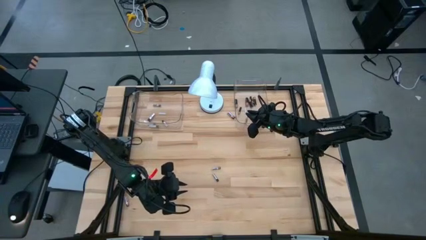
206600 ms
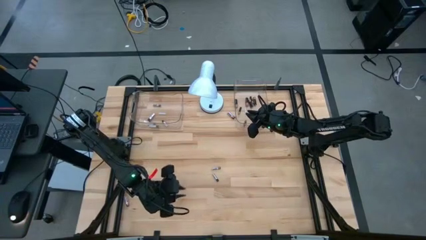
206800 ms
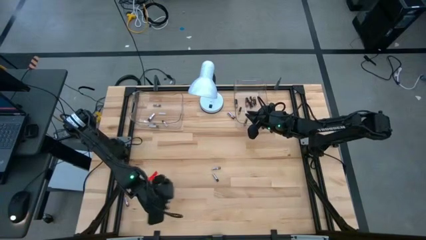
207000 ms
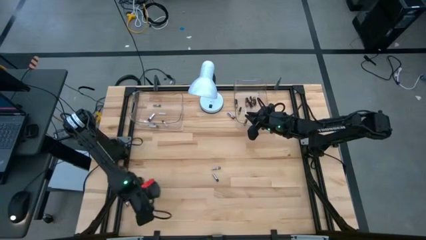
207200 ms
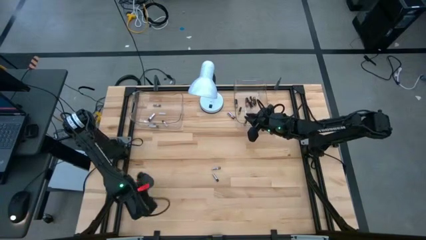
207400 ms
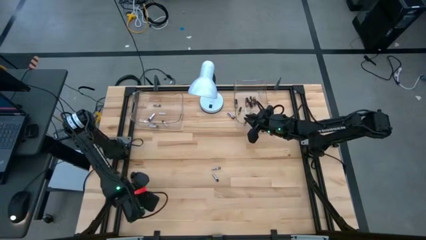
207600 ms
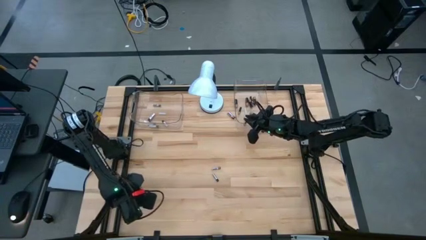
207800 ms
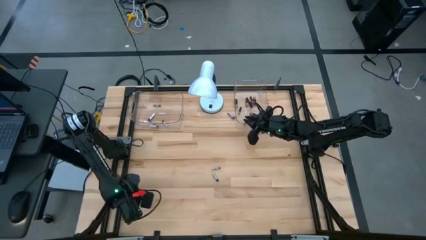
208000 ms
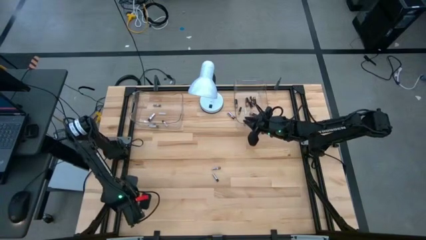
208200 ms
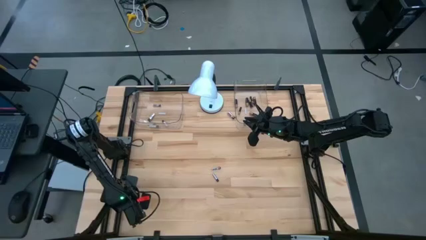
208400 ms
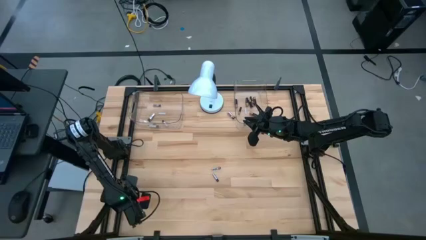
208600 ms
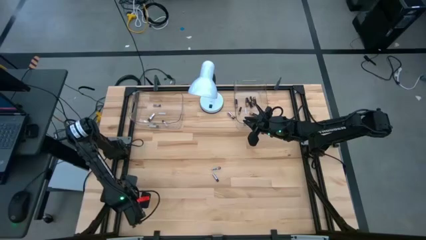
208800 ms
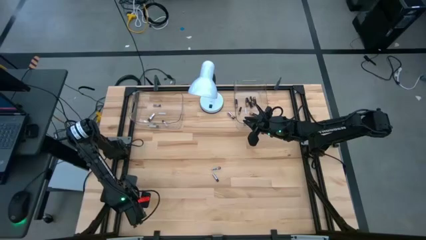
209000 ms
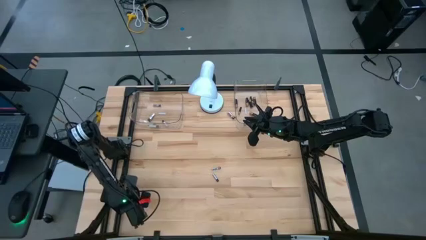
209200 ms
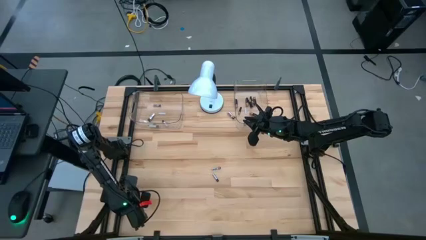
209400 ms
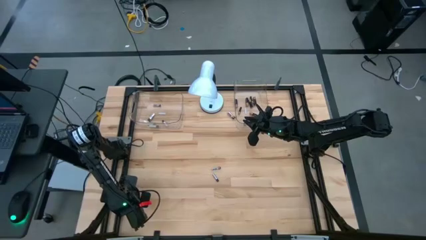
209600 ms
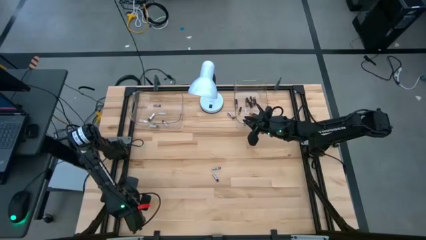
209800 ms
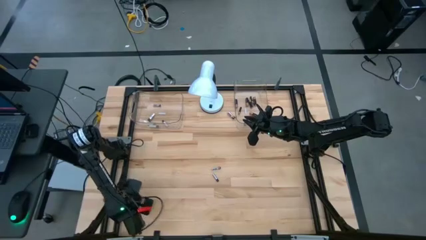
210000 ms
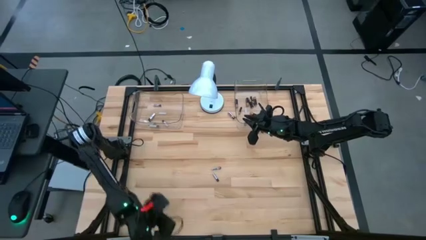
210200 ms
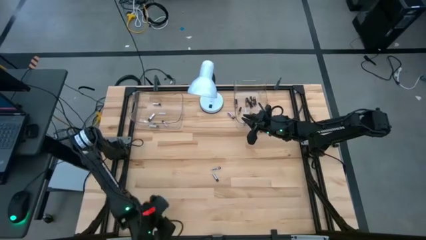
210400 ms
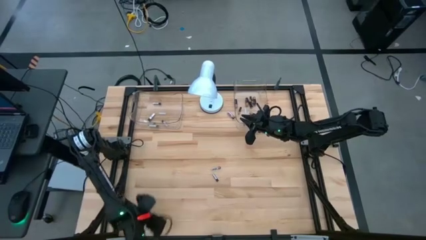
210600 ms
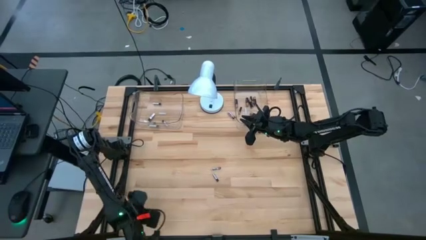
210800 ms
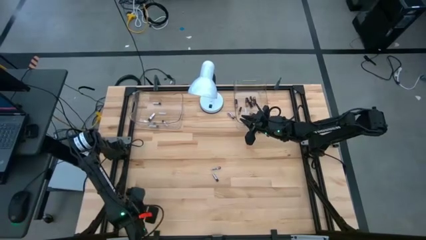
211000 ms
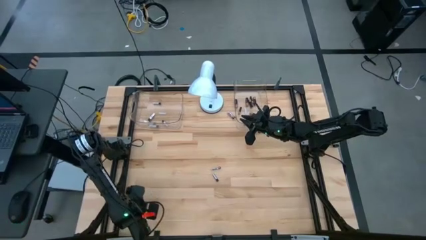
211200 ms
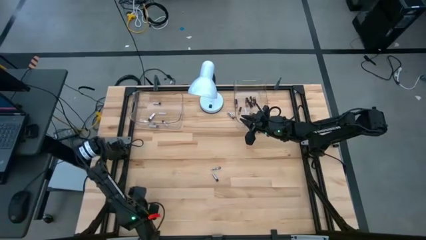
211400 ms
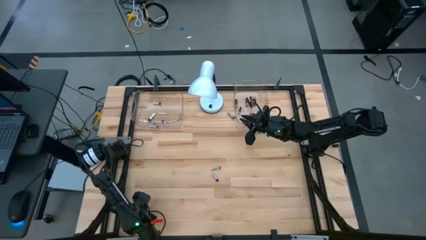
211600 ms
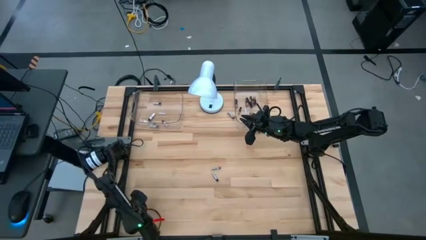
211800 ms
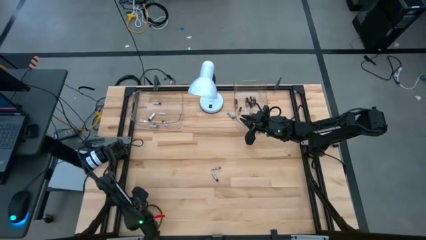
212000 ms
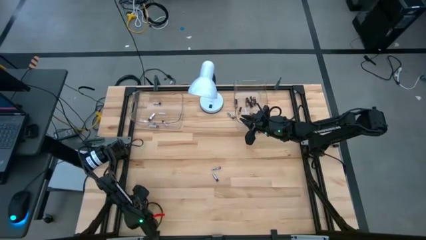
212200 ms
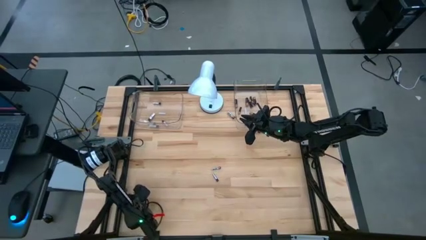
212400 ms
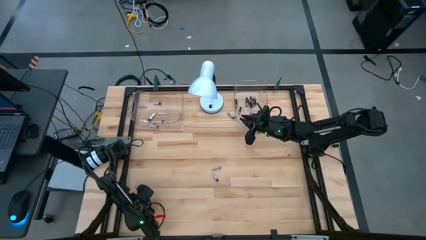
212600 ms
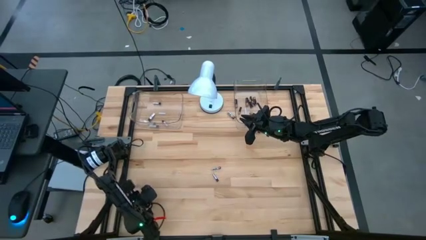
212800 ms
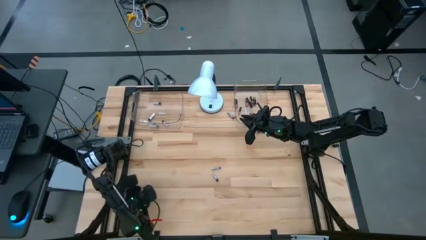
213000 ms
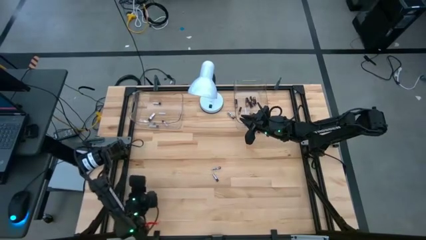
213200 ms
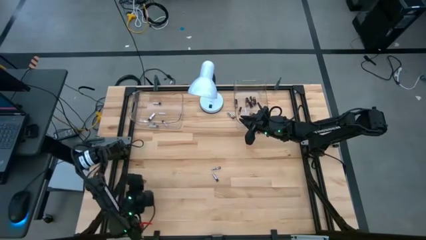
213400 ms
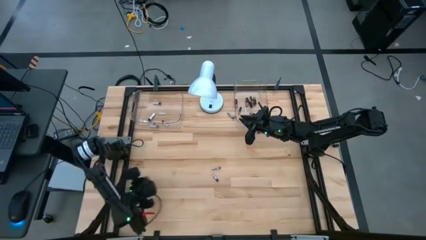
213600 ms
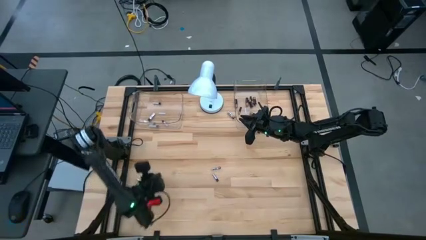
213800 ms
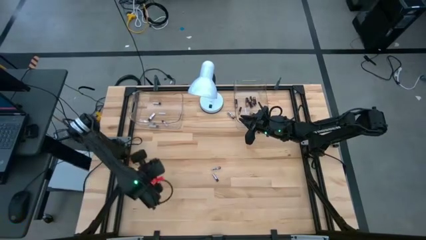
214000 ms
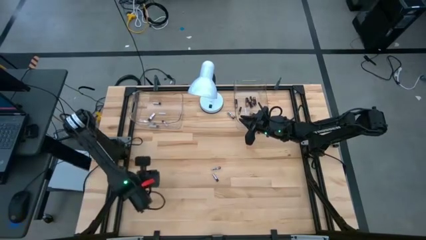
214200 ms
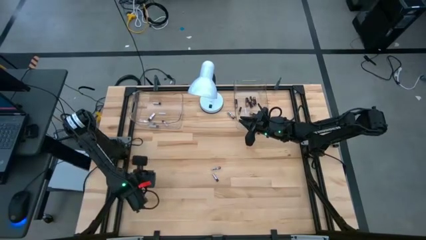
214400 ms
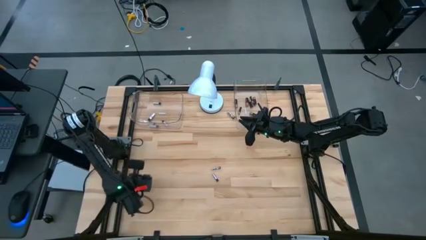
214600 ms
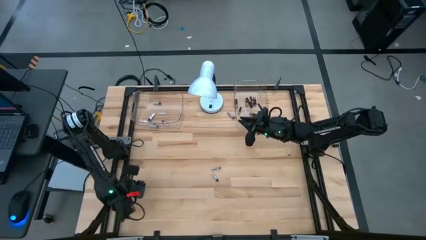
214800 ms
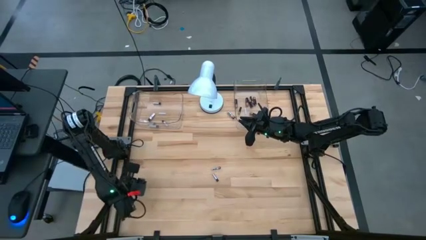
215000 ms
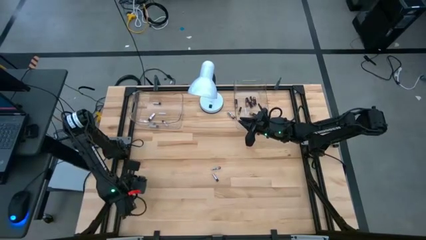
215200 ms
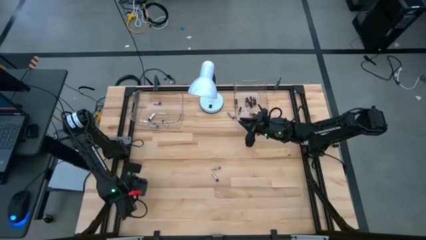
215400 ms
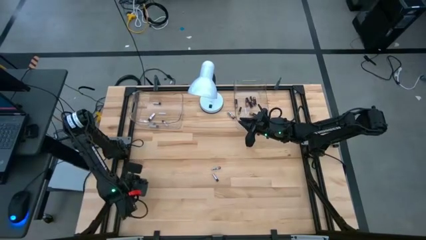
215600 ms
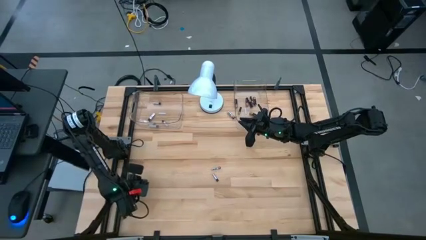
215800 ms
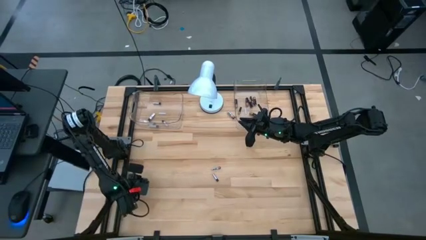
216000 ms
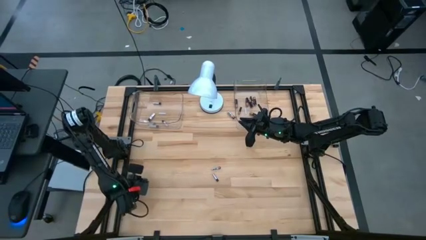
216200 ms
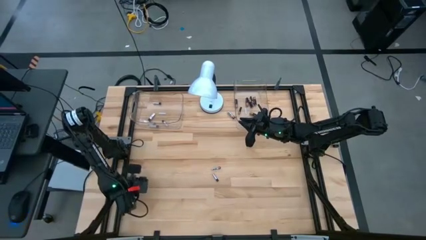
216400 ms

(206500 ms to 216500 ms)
Task: Sort batteries
Put the silver battery in the transparent bin

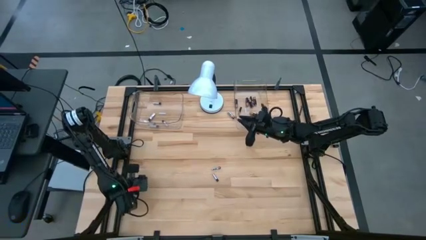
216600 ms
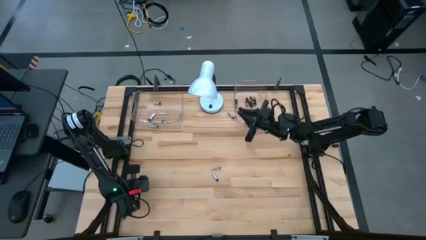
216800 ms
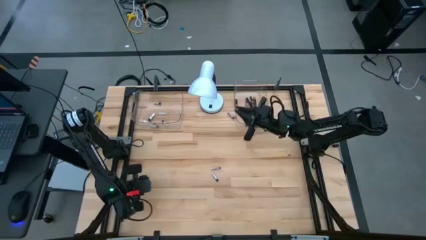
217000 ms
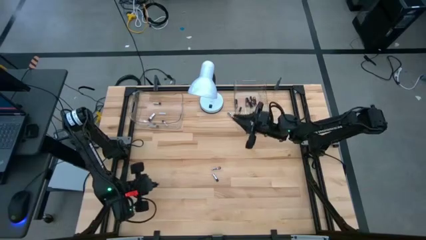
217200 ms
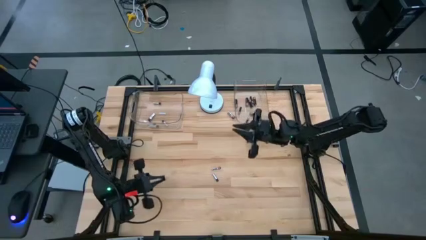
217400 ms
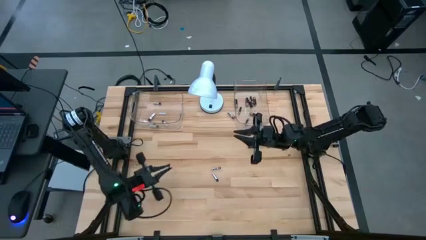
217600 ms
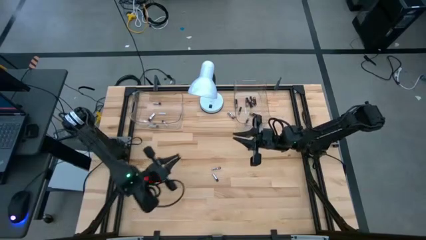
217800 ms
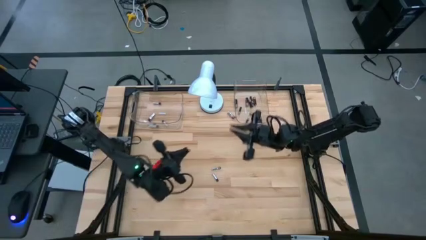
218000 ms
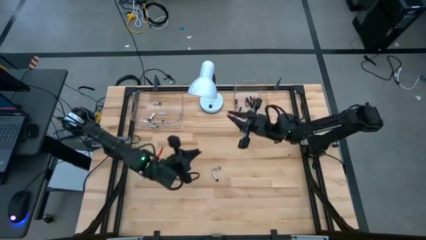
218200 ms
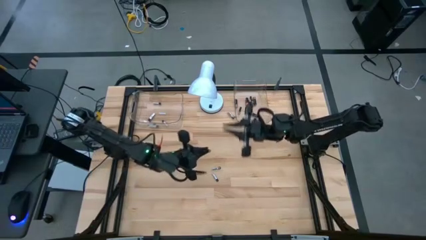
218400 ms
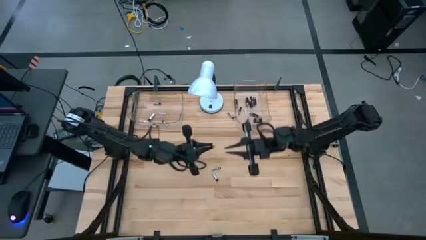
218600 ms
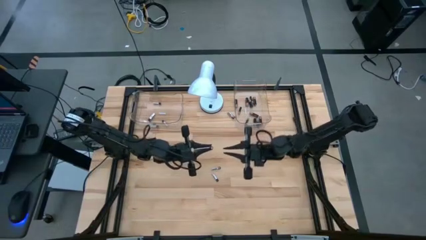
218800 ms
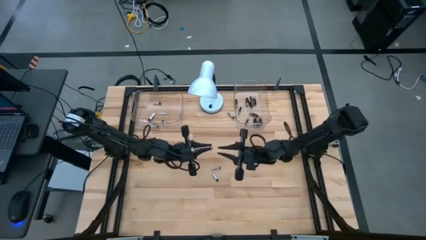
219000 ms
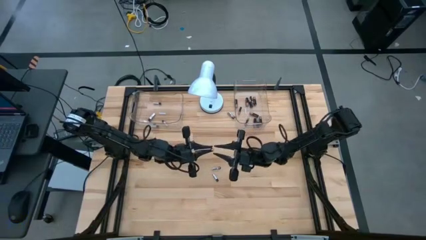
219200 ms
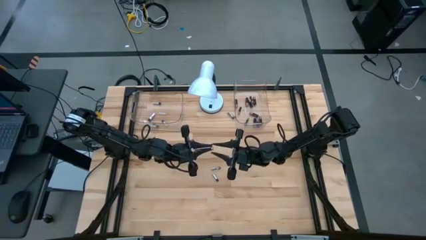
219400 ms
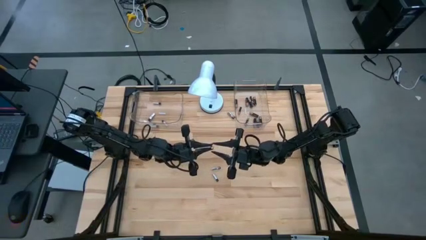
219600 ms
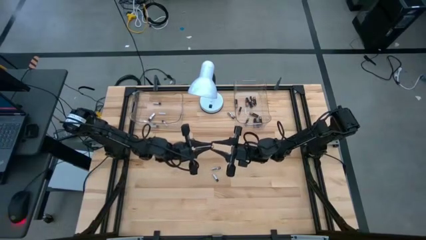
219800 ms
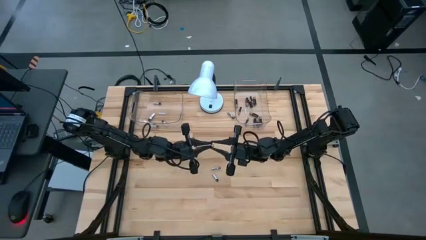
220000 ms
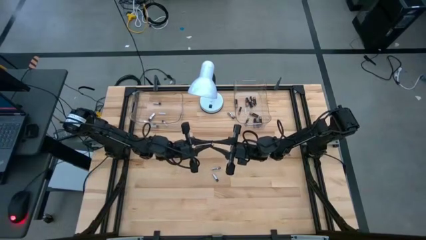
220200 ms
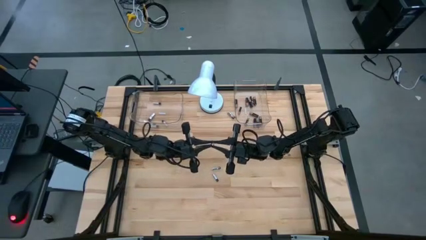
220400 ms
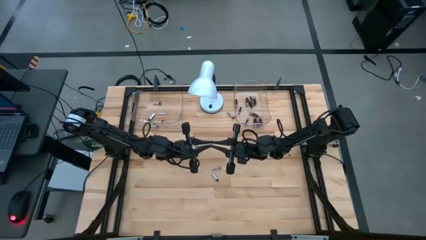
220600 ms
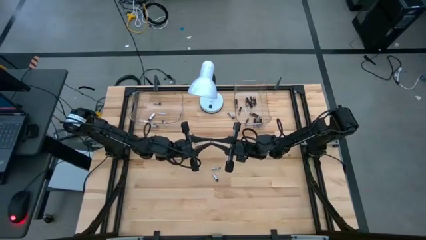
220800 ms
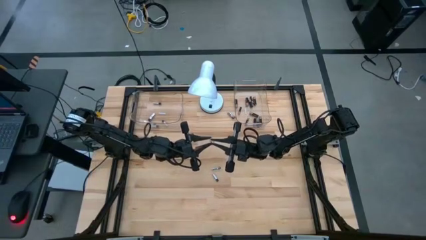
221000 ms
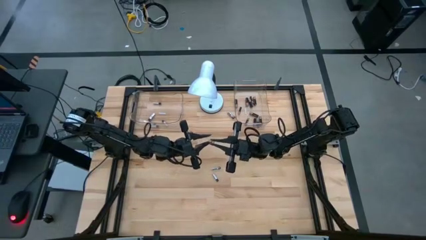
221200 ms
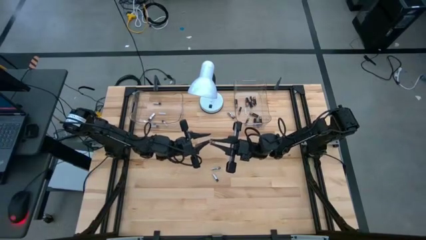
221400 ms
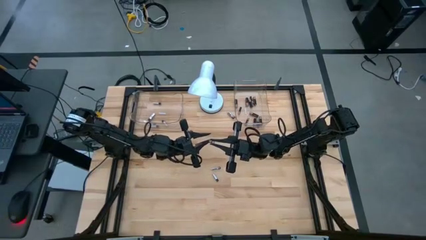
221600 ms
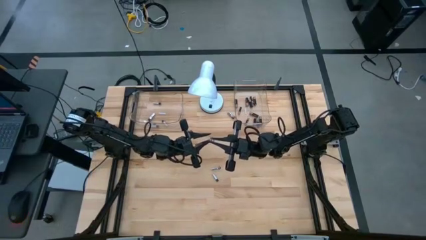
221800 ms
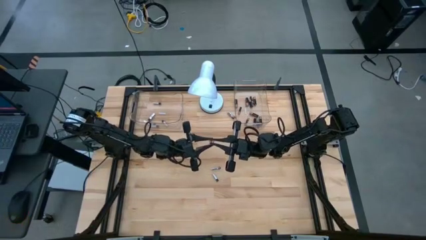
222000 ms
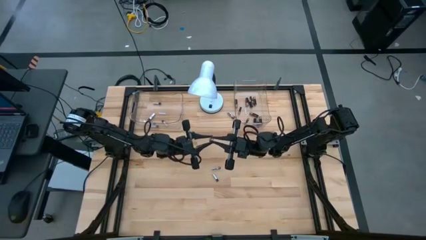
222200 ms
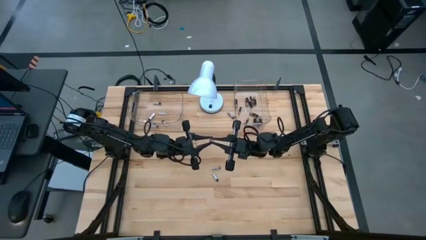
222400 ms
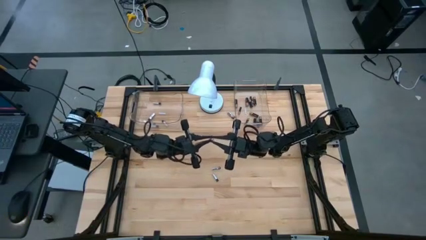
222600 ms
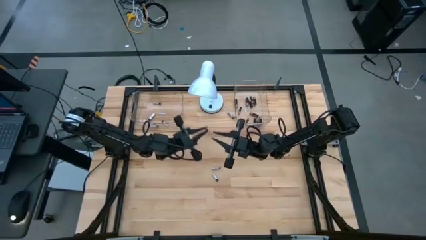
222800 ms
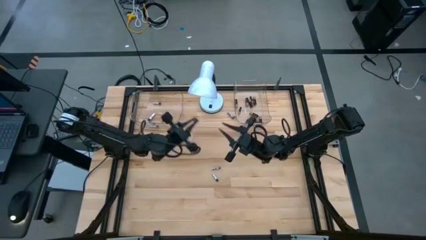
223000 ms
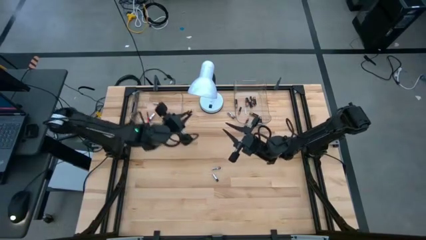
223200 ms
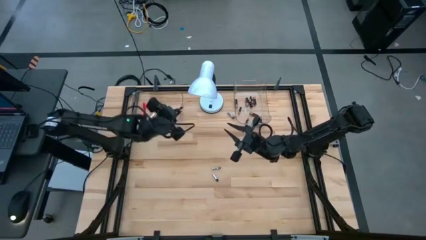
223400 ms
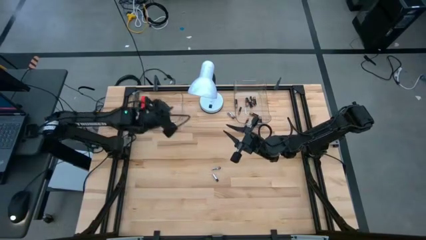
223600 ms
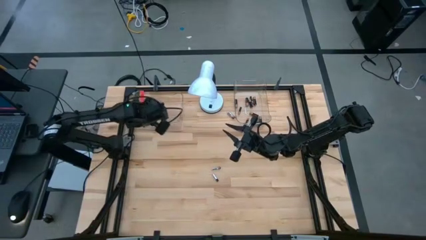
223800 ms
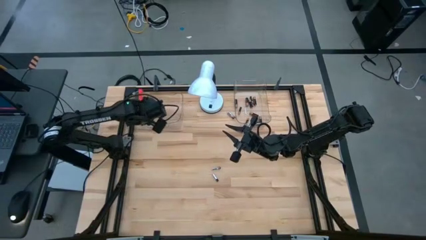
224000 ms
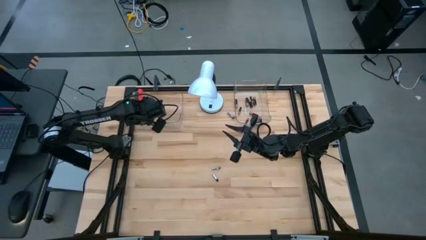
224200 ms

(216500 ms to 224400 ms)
Put the silver battery in the transparent bin
